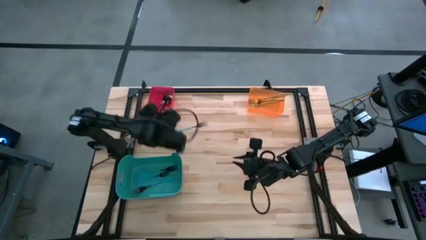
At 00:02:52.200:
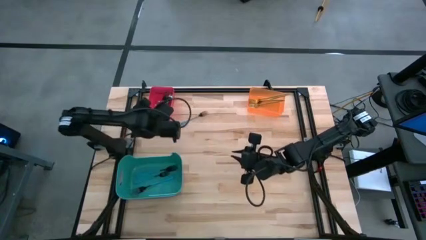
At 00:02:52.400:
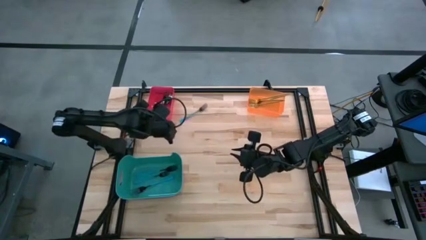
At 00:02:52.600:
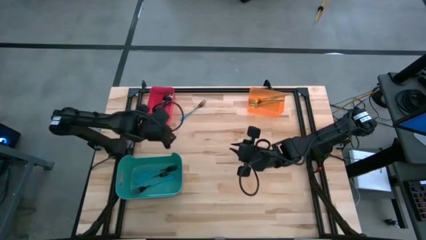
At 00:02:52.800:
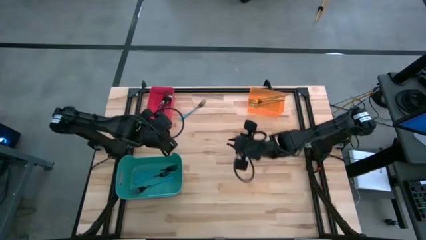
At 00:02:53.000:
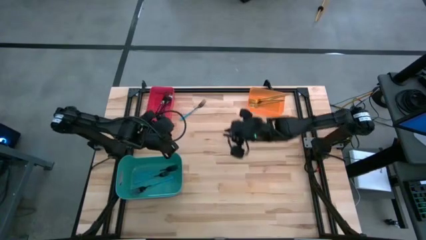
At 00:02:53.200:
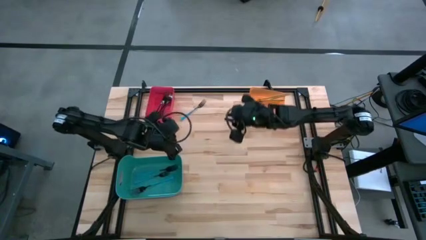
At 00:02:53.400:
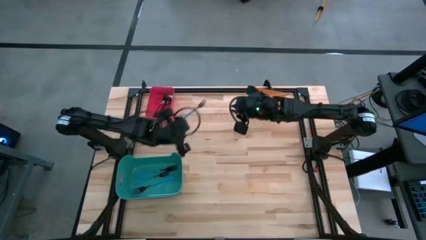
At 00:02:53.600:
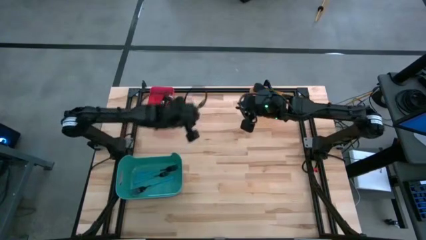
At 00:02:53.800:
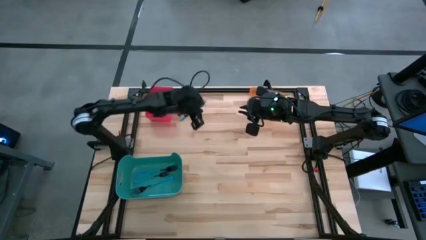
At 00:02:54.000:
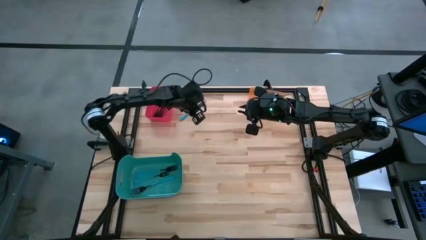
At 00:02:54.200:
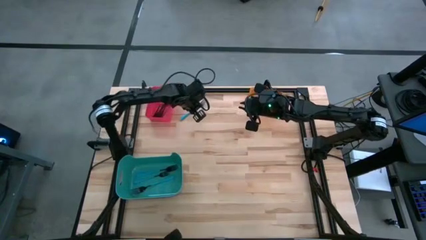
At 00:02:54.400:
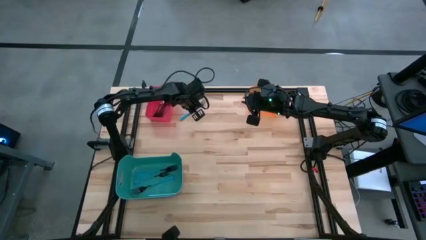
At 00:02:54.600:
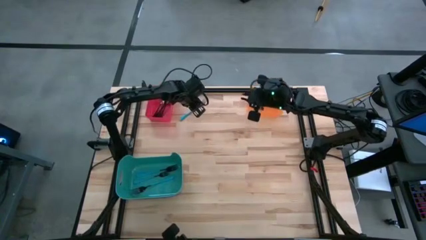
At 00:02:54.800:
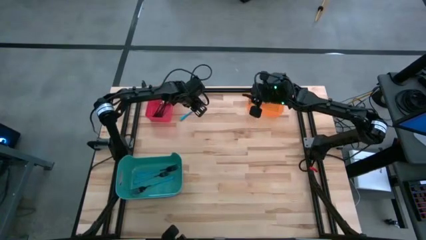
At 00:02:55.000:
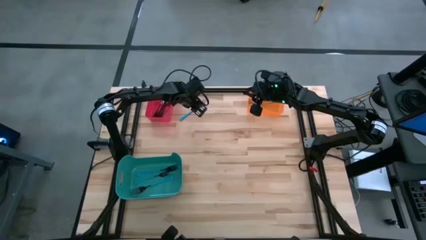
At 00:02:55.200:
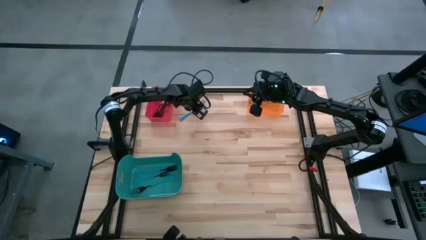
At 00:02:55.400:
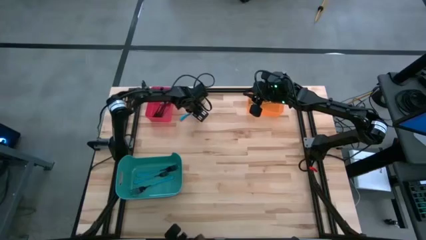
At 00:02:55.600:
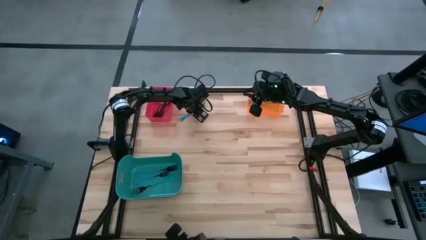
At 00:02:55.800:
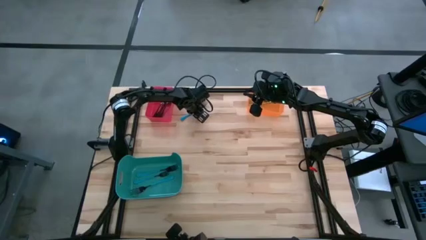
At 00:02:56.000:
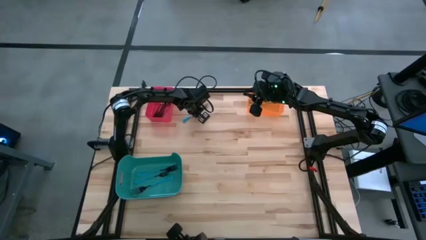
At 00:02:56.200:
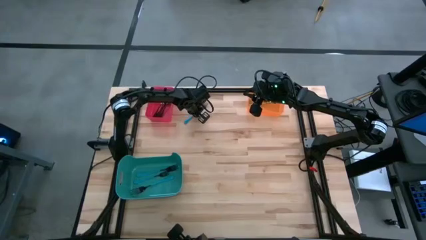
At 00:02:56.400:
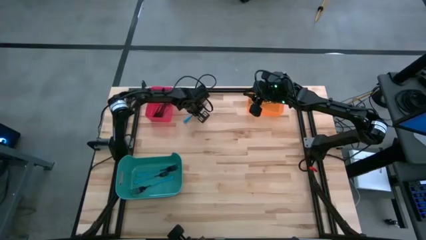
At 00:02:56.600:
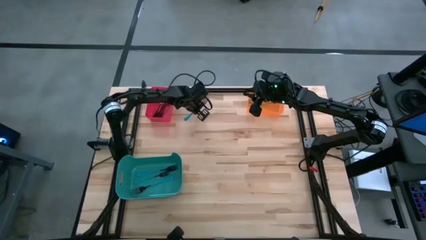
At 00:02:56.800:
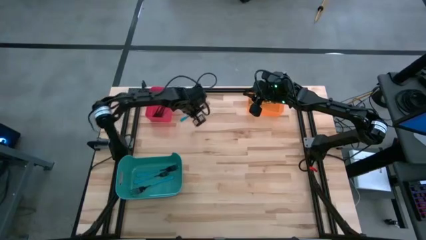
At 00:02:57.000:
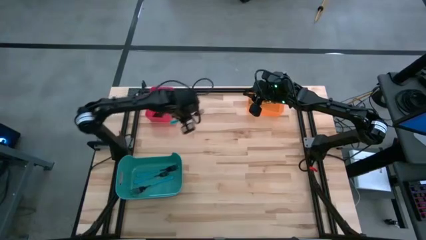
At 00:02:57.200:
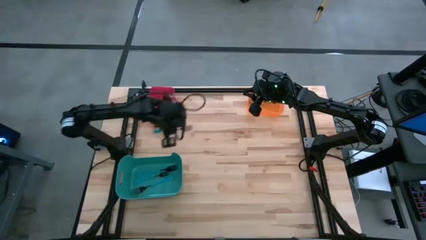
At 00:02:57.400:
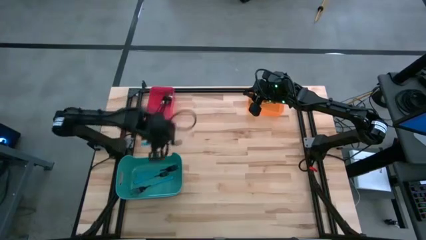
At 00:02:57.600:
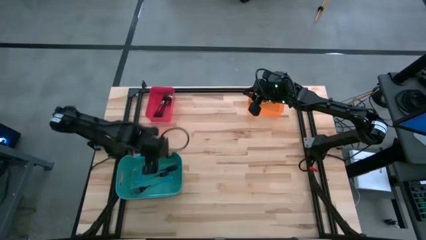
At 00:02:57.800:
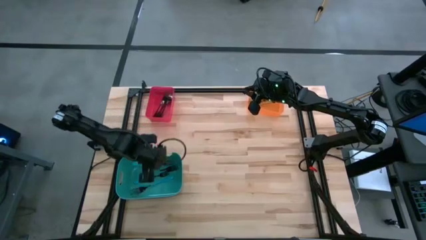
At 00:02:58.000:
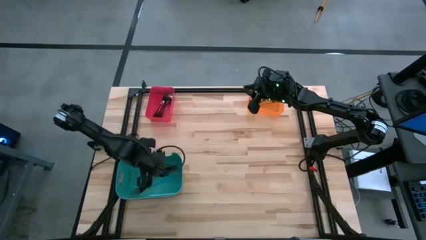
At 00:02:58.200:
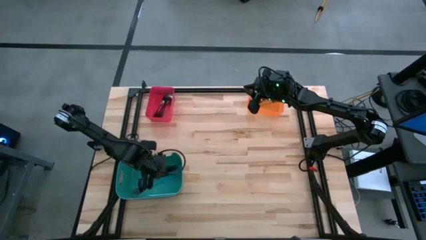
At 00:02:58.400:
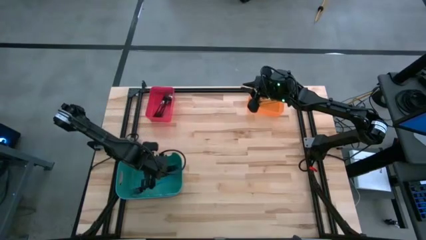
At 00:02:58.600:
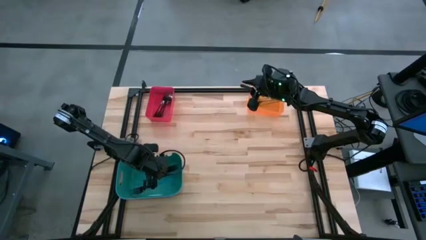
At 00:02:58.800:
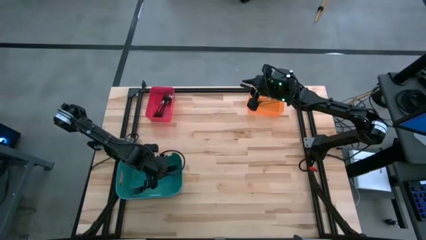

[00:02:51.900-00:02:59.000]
Task: Sort silverware by color (type)
Put the blue fork into the green bin

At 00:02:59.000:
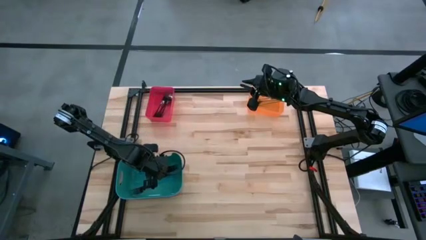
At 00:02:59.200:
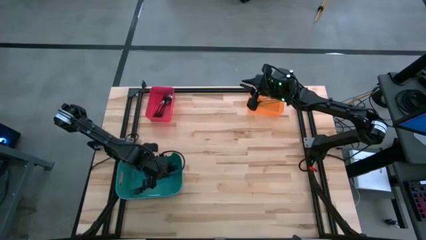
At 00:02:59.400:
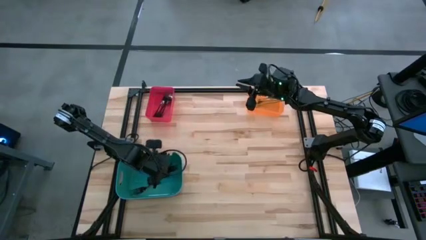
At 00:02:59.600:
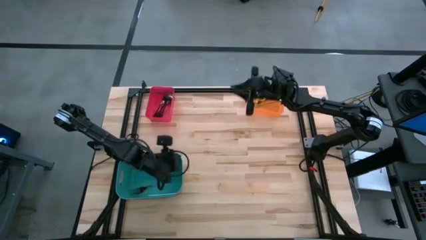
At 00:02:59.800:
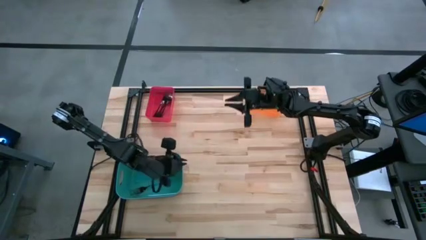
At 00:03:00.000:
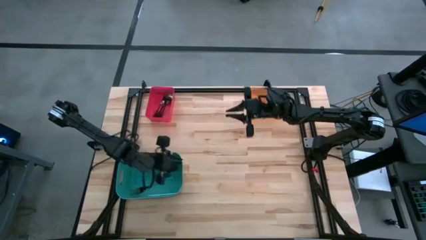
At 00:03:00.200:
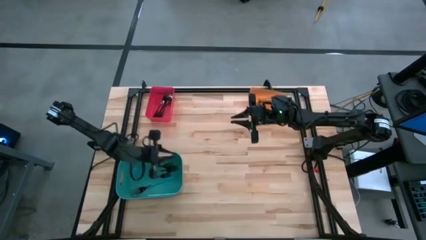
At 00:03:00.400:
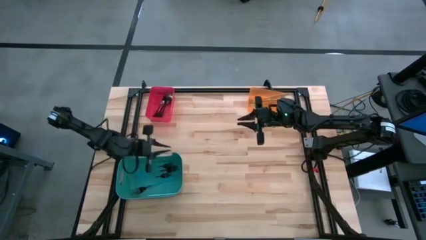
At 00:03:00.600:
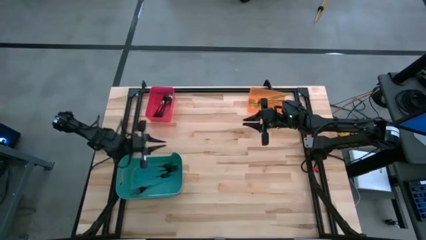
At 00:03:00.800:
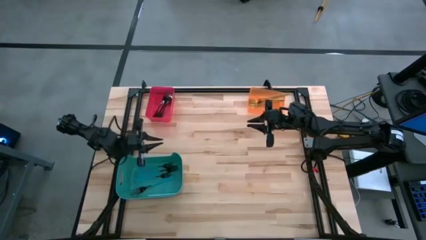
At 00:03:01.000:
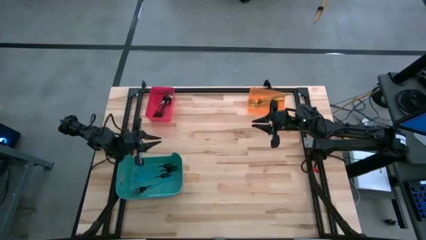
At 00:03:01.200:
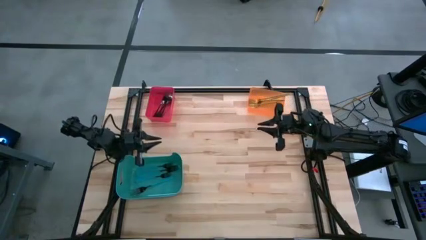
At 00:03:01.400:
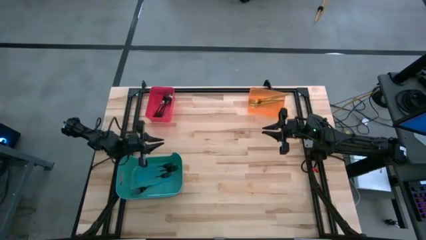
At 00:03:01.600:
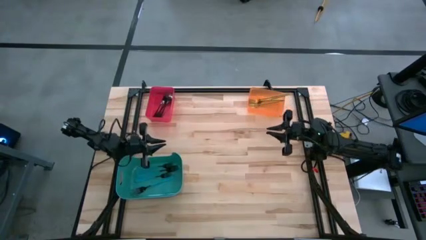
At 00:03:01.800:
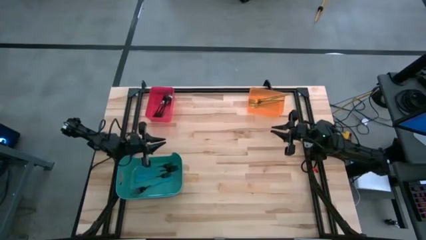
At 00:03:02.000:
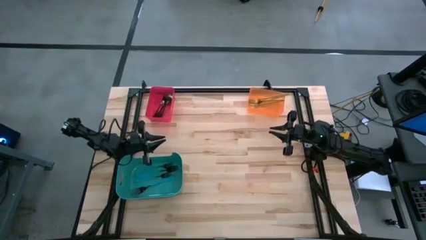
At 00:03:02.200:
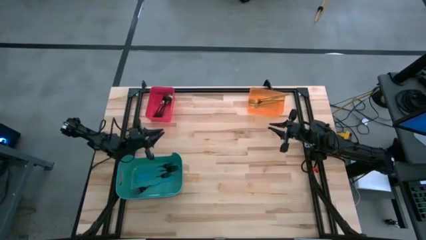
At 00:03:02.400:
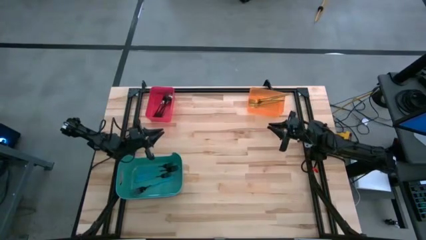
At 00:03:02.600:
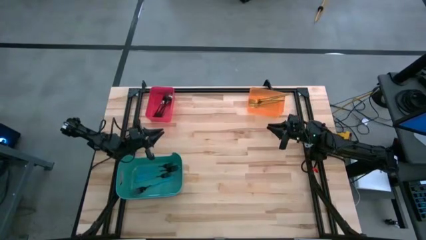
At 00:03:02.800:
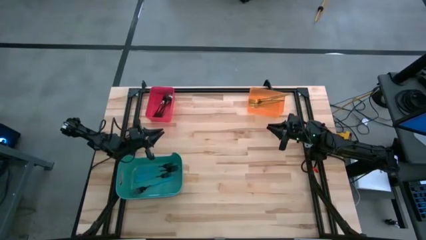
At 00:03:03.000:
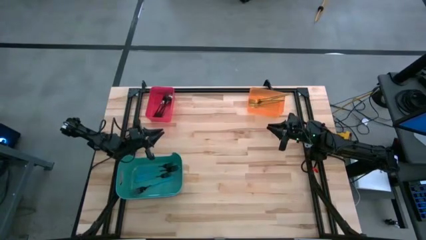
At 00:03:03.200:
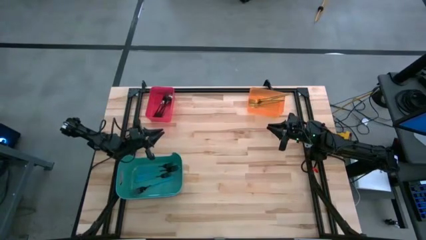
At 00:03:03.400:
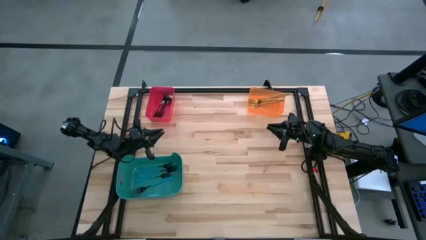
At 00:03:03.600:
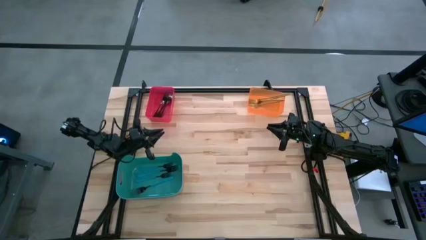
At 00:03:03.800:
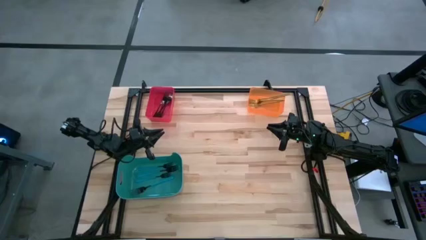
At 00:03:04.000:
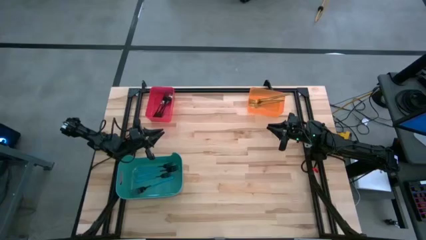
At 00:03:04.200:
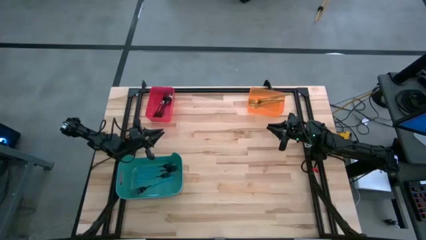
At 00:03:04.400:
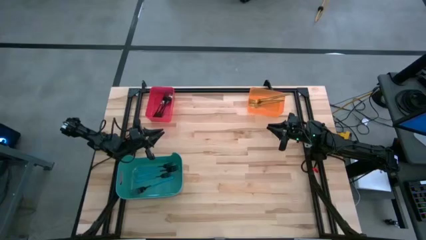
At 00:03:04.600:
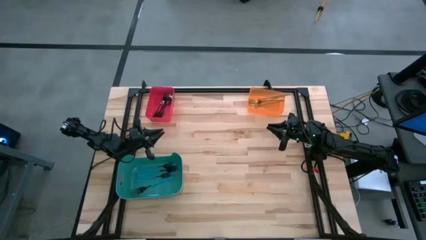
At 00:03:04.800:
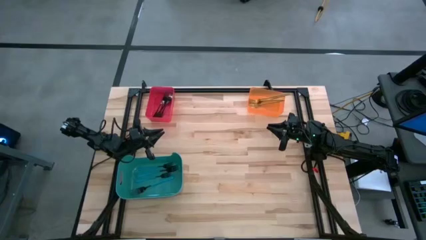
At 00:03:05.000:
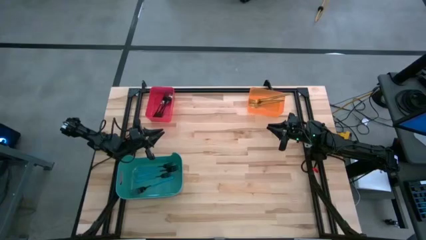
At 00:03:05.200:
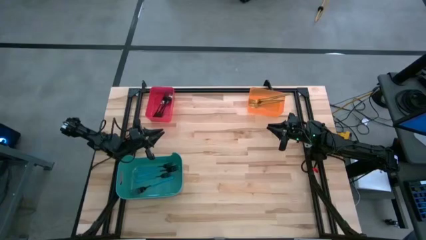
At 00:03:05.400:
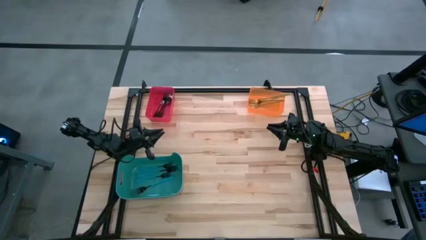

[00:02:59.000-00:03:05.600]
Return to Home Position
